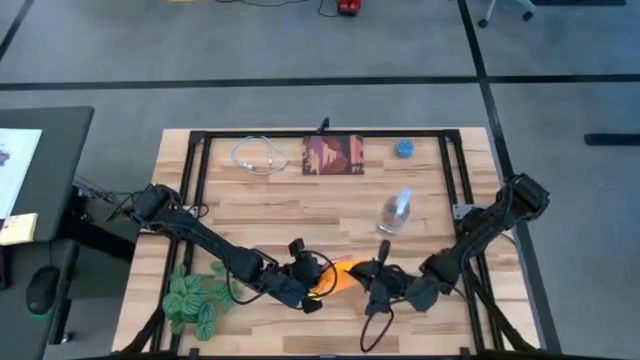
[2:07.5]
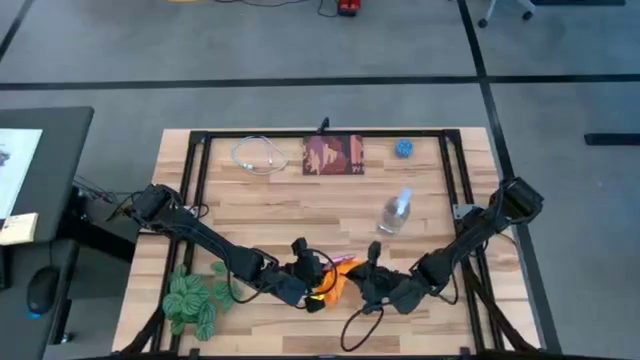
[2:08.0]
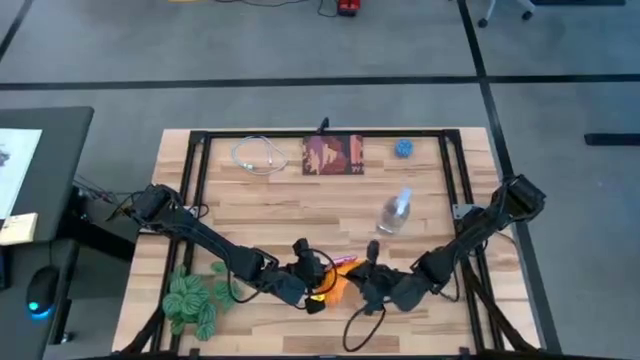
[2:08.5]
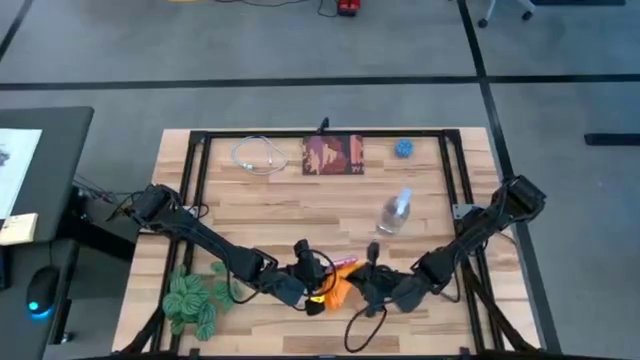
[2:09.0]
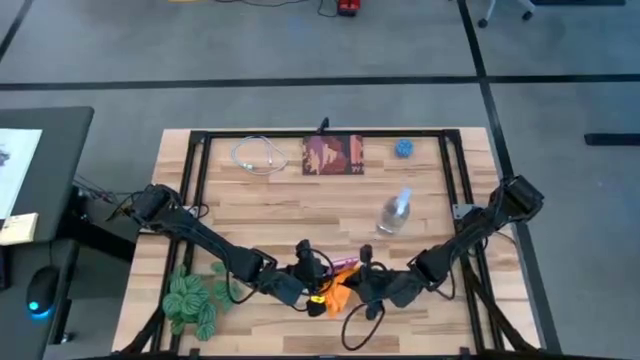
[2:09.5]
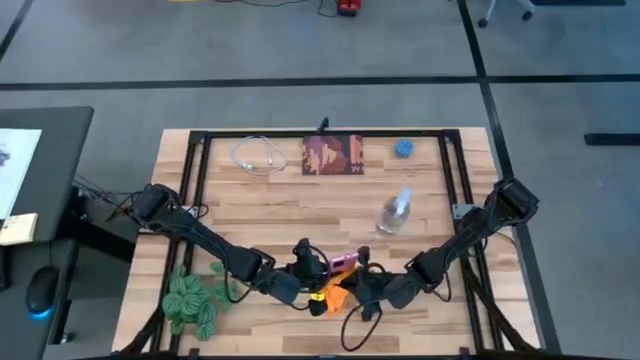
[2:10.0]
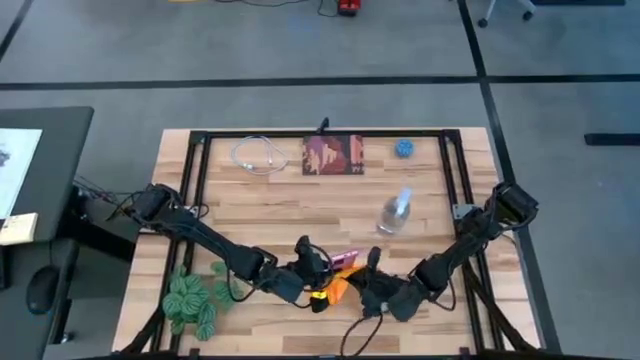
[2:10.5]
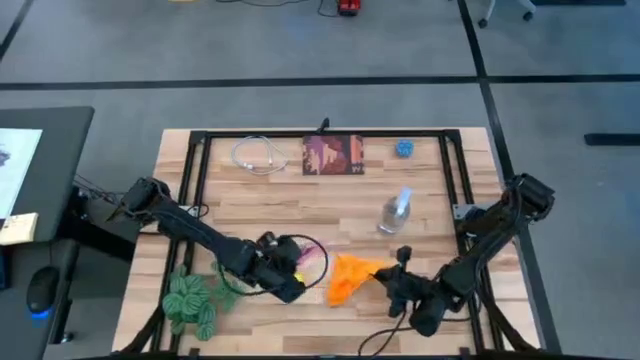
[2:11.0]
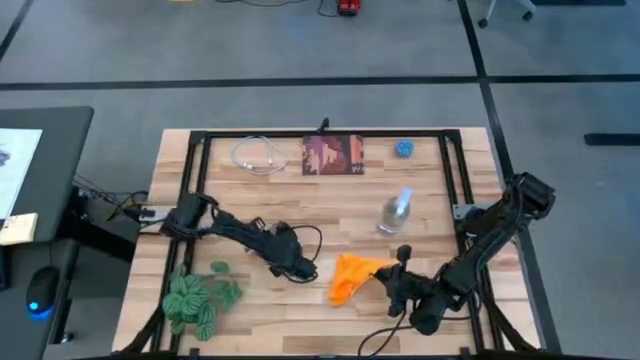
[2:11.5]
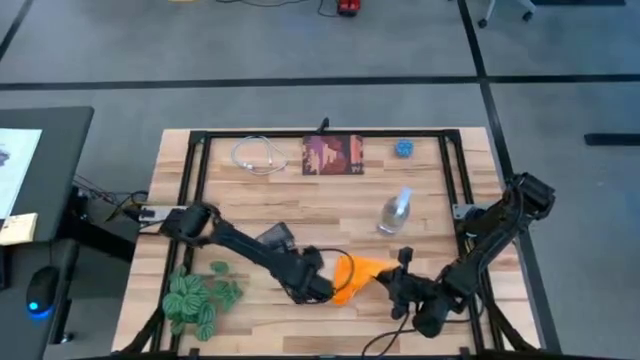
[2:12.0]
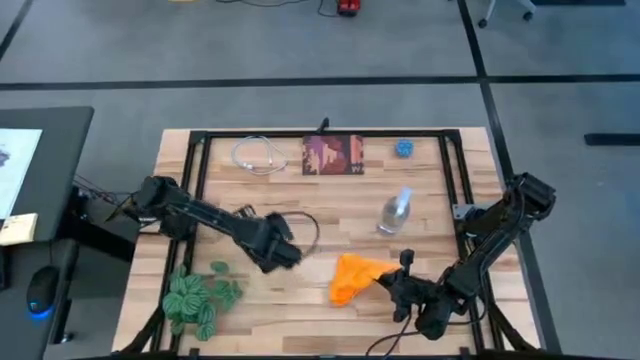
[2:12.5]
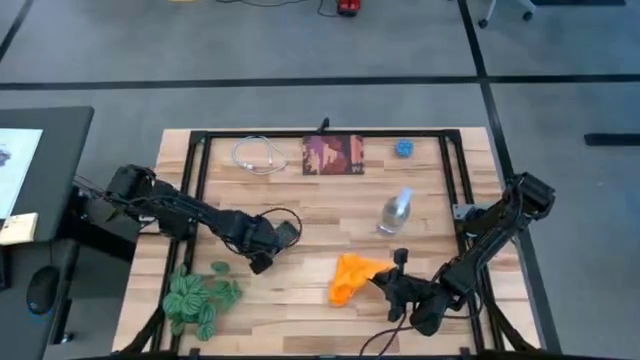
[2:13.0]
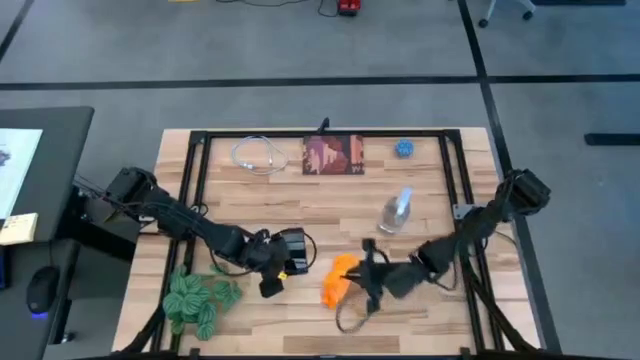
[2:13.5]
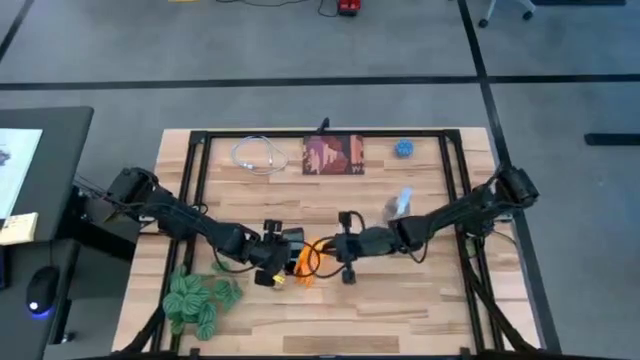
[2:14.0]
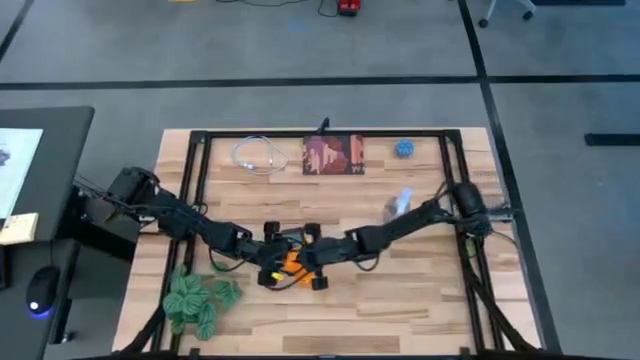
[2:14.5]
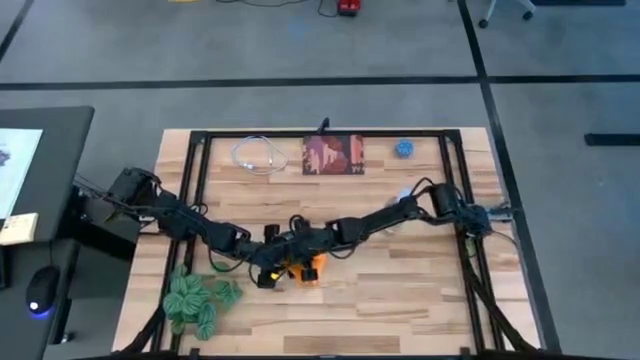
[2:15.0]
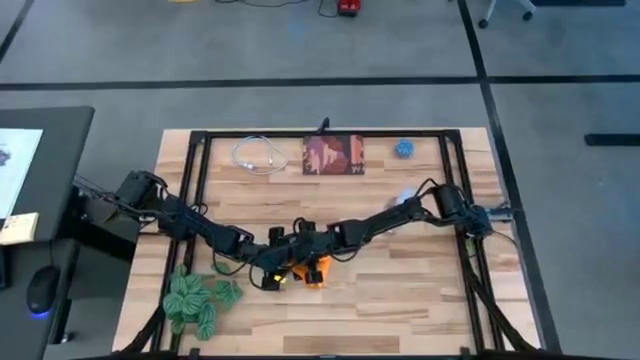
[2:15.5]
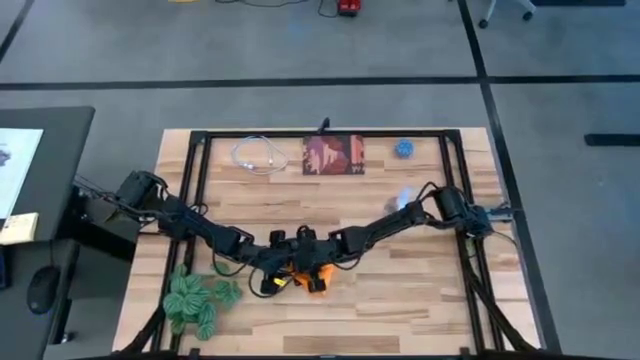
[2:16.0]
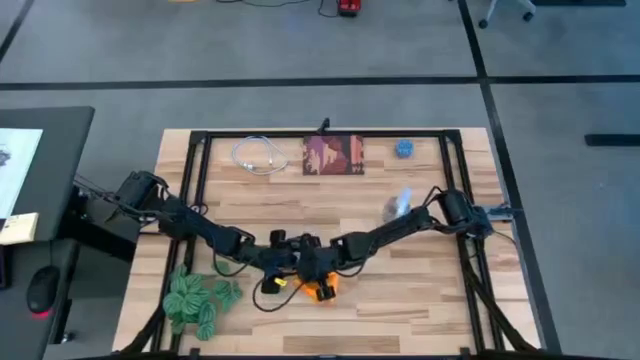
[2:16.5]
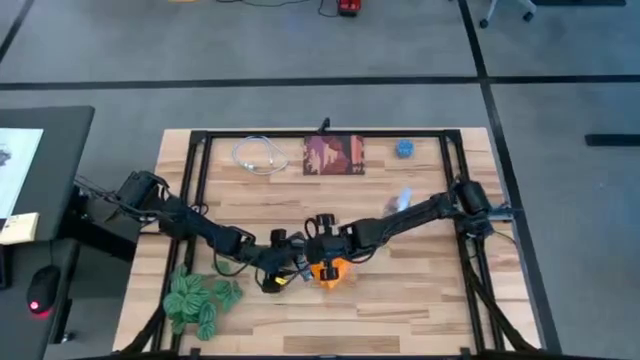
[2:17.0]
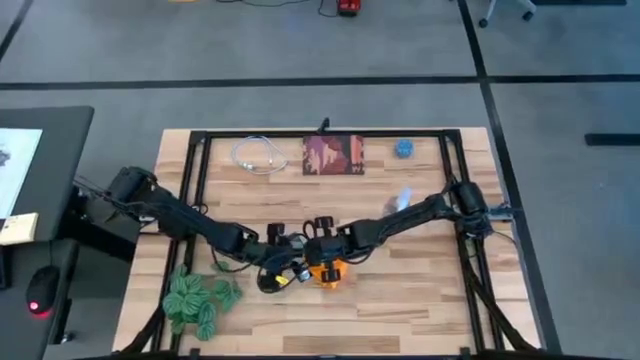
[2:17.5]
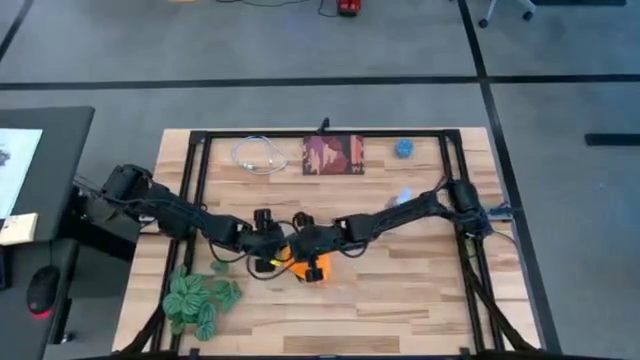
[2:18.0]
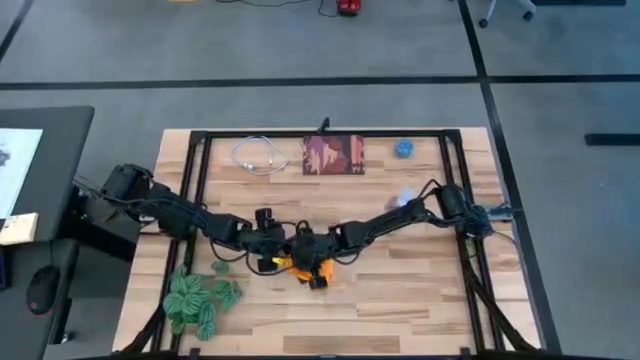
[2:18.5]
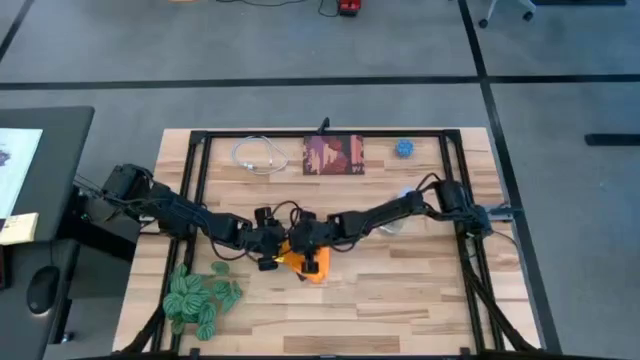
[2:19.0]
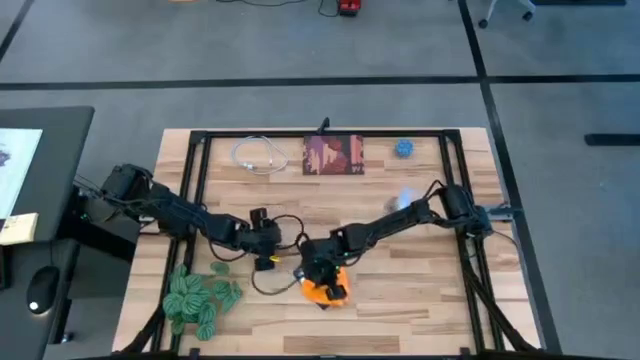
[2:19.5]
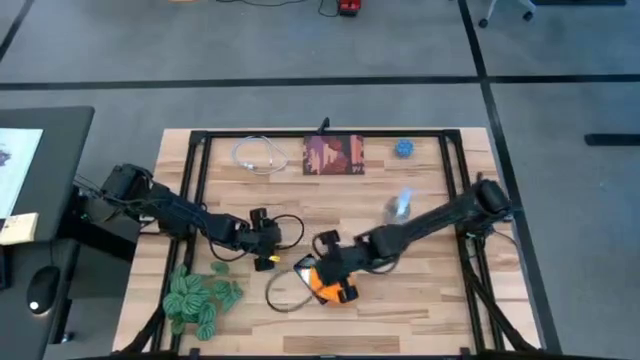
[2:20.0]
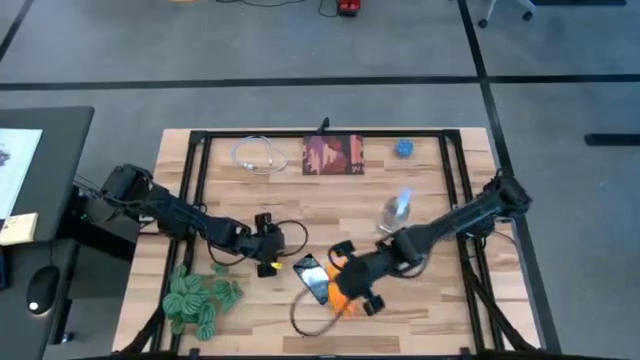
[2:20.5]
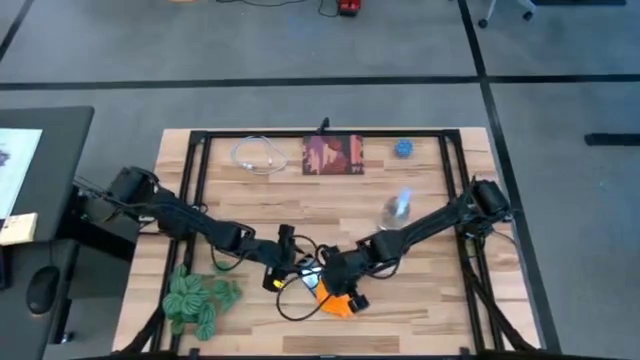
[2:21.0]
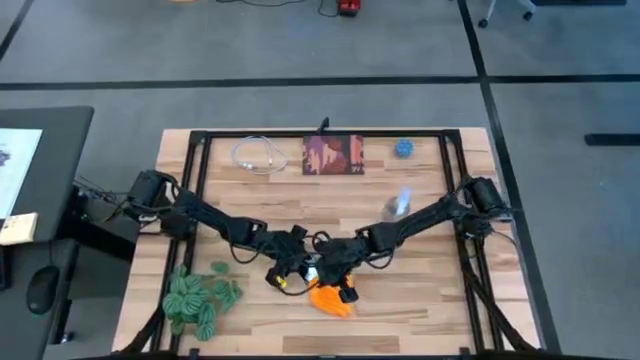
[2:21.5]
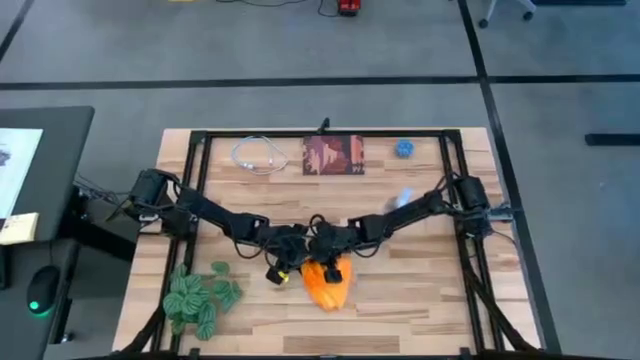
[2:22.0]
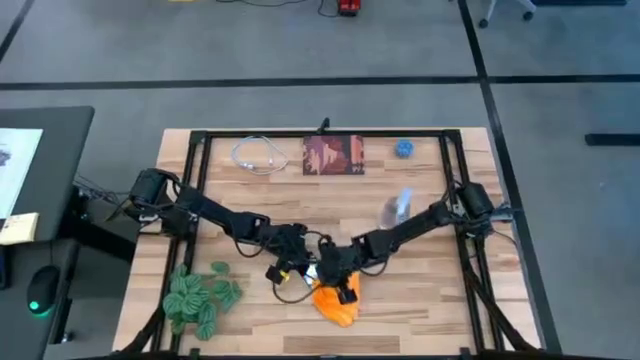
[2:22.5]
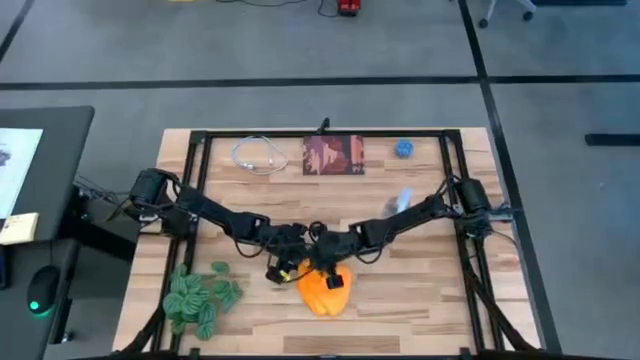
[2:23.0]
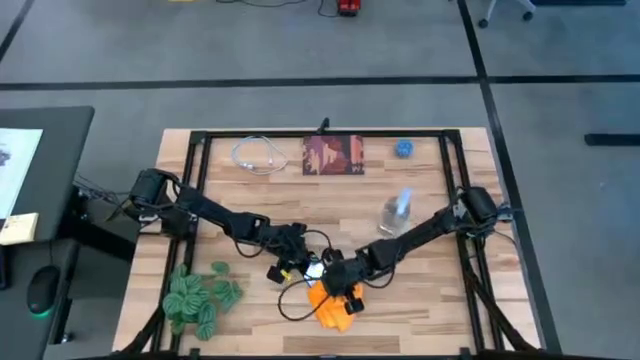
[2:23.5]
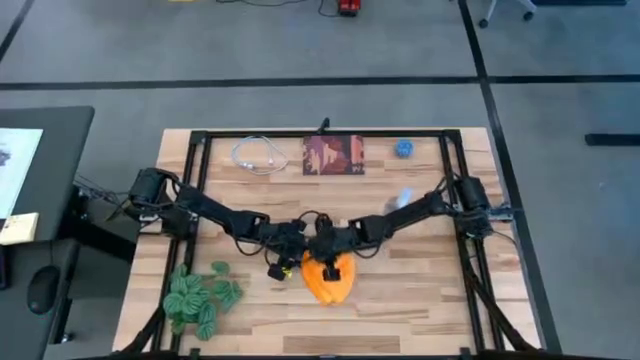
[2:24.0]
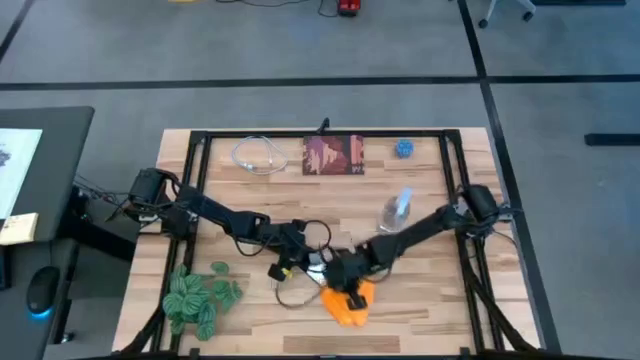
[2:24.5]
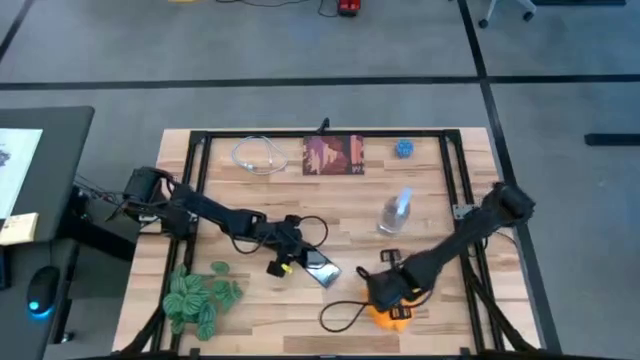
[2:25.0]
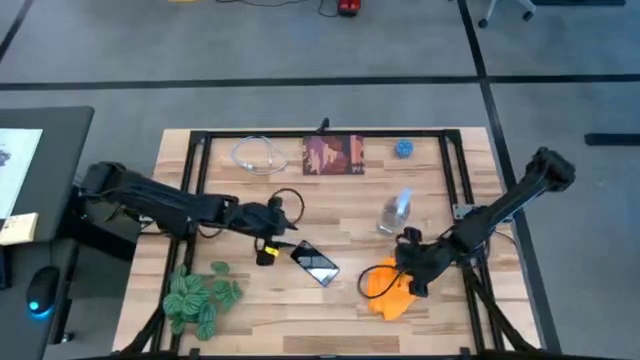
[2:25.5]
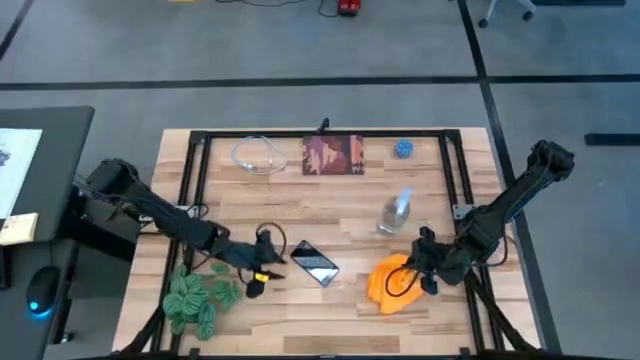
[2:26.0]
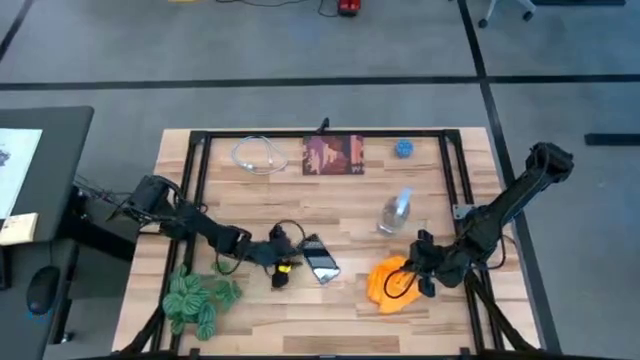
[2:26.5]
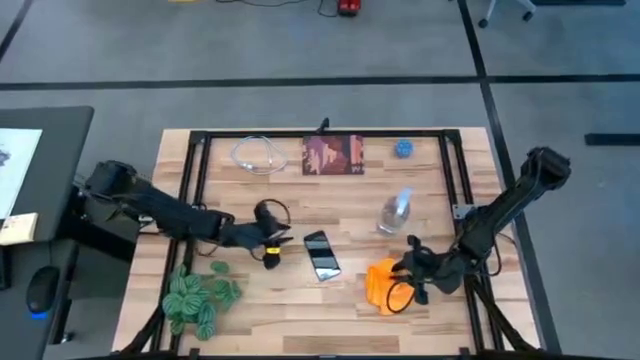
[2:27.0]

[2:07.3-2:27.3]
Task: Apply microfiber cloth
Wipe the pink cellphone using microfiber cloth
